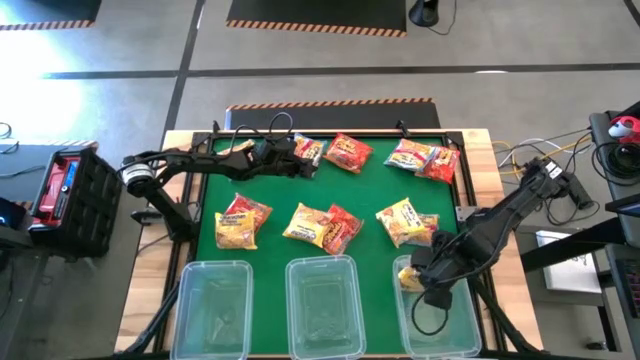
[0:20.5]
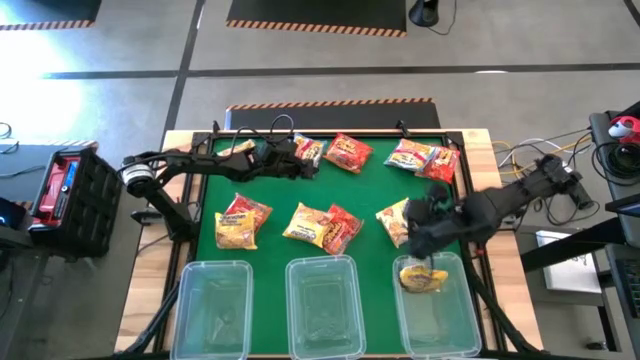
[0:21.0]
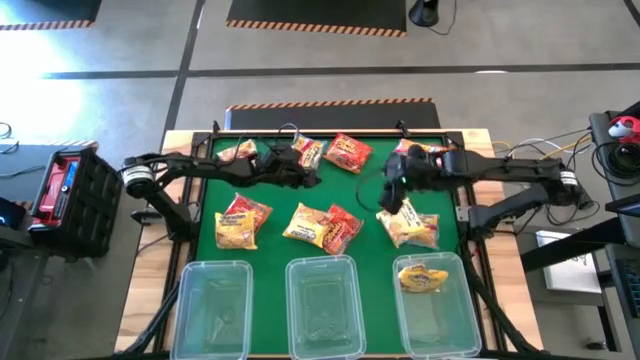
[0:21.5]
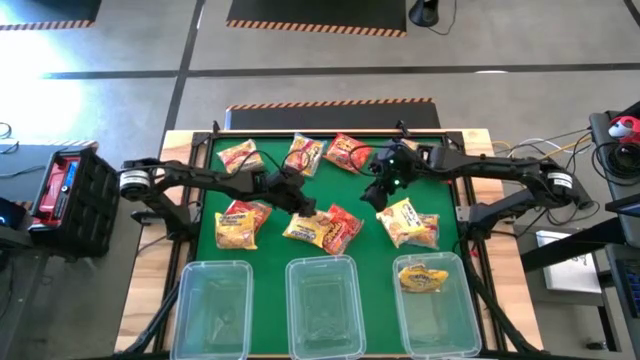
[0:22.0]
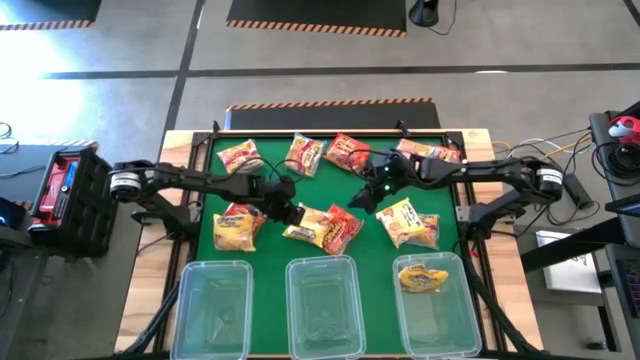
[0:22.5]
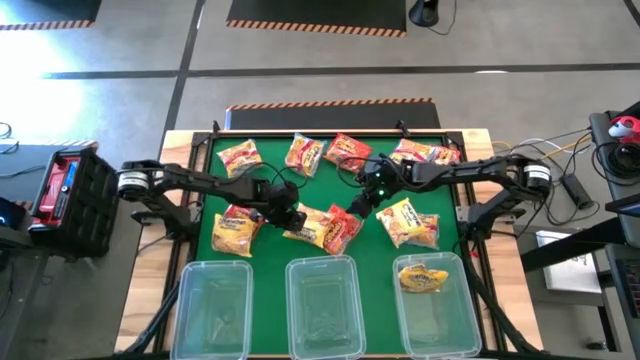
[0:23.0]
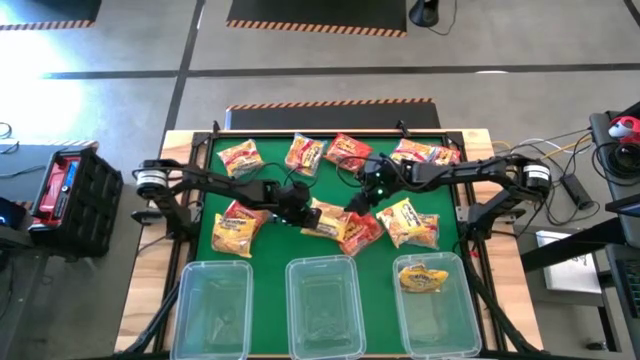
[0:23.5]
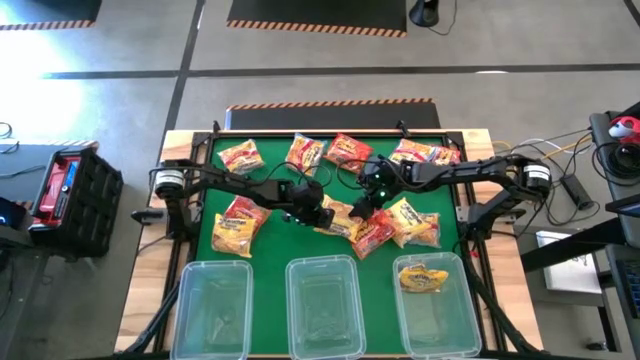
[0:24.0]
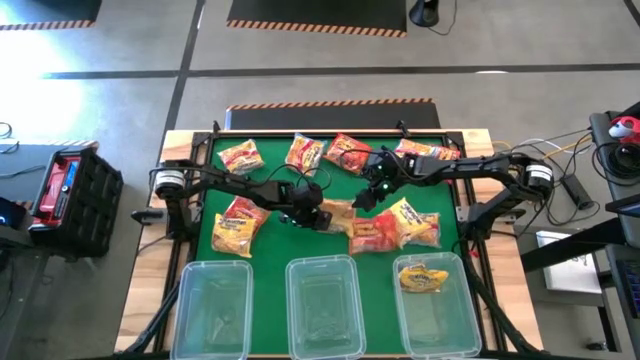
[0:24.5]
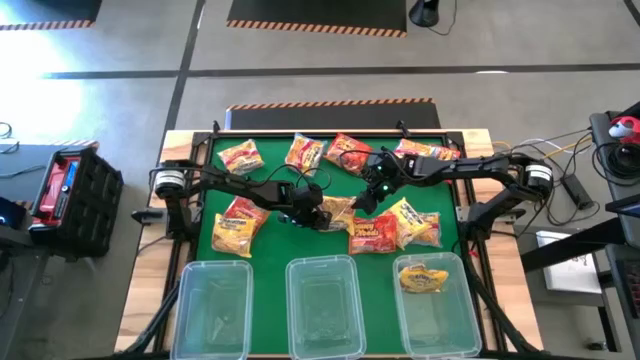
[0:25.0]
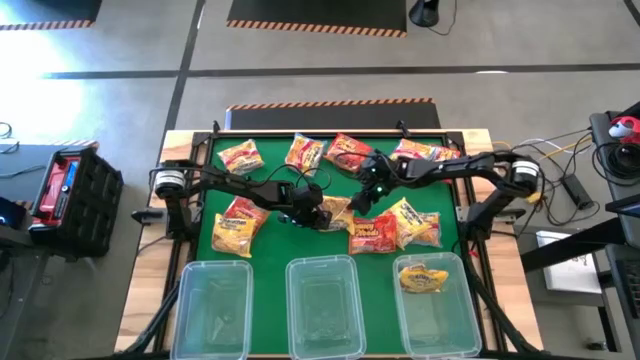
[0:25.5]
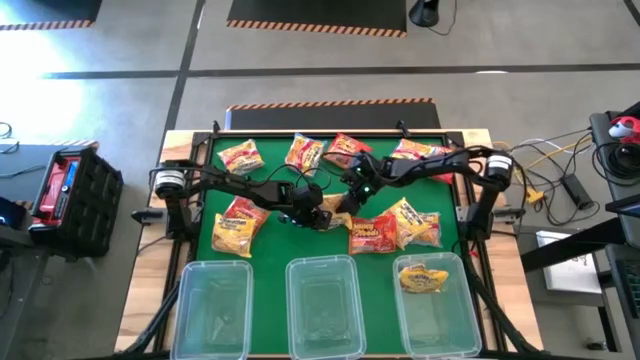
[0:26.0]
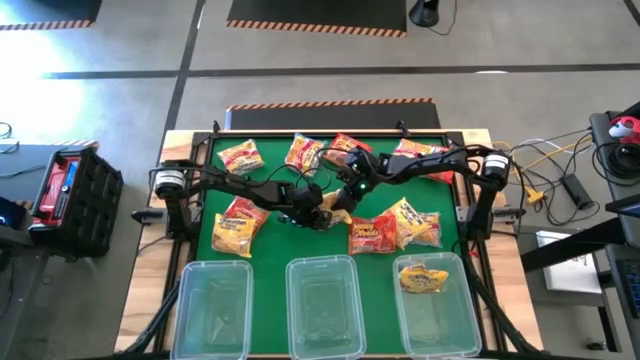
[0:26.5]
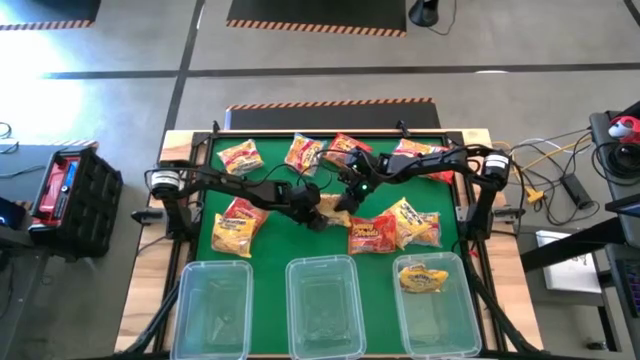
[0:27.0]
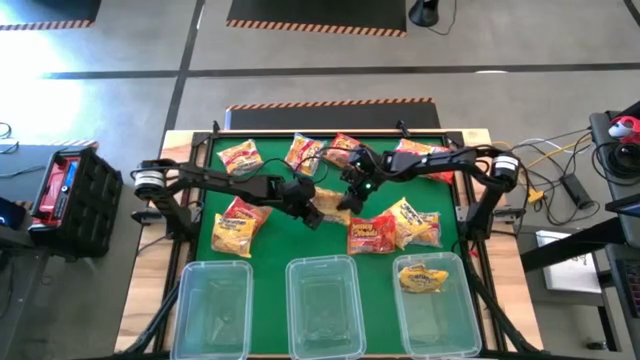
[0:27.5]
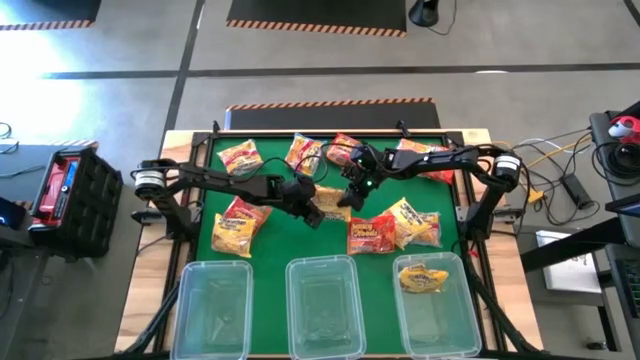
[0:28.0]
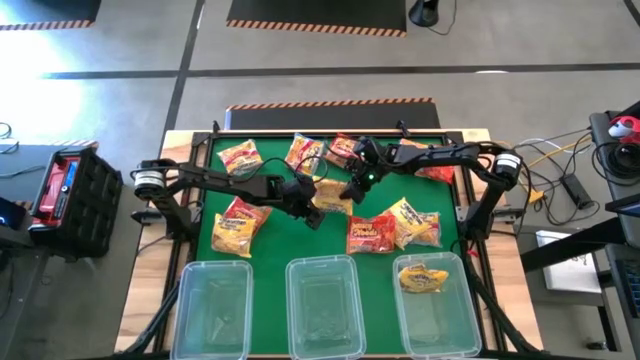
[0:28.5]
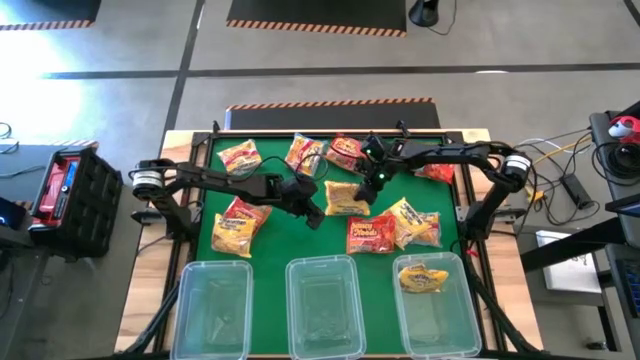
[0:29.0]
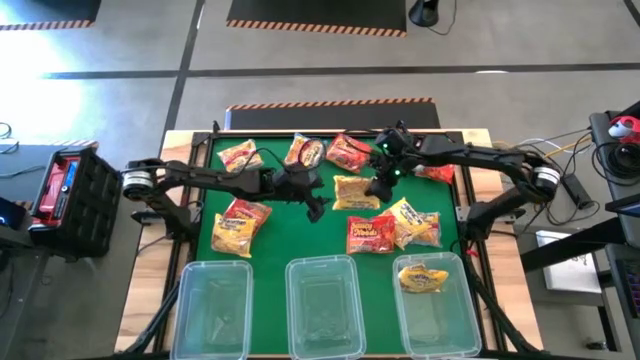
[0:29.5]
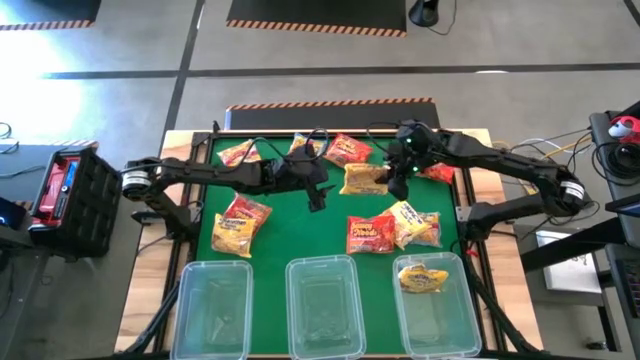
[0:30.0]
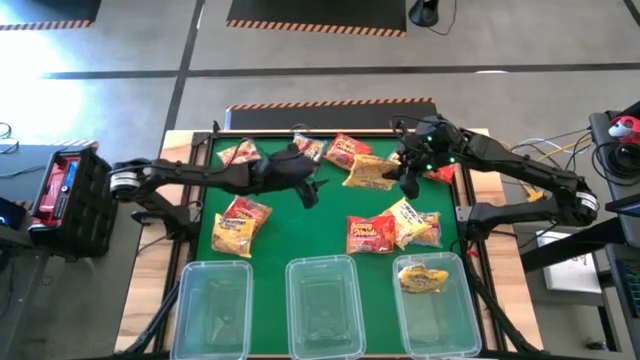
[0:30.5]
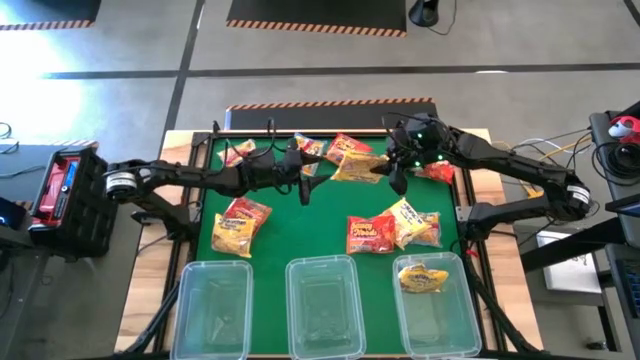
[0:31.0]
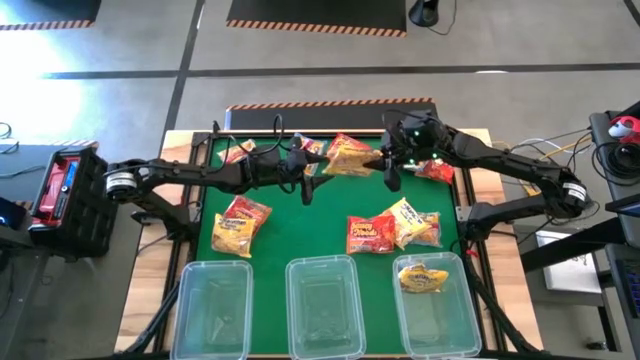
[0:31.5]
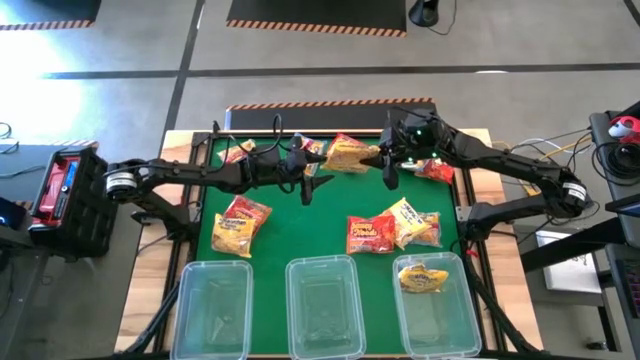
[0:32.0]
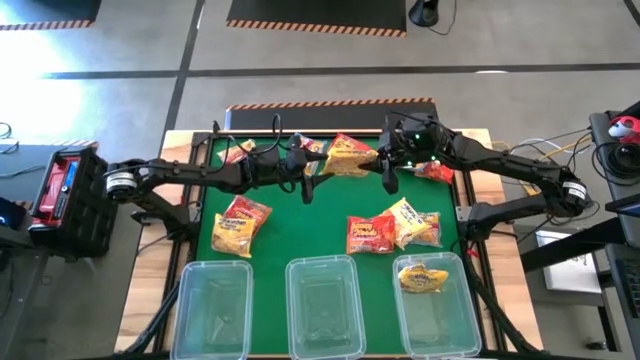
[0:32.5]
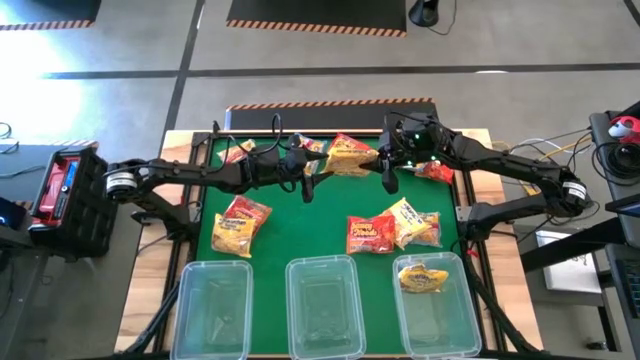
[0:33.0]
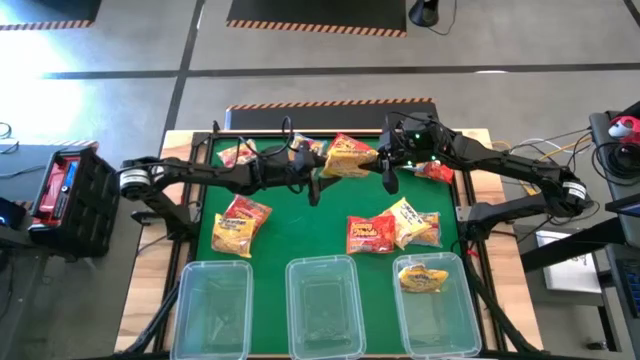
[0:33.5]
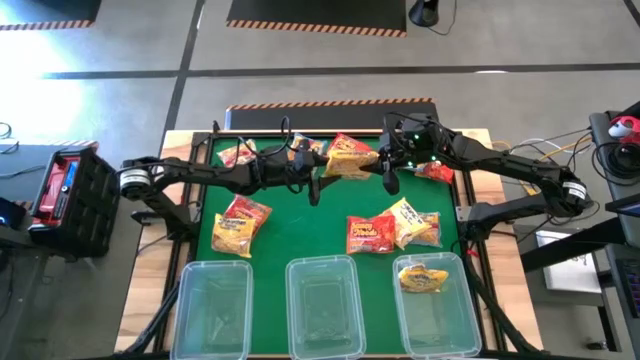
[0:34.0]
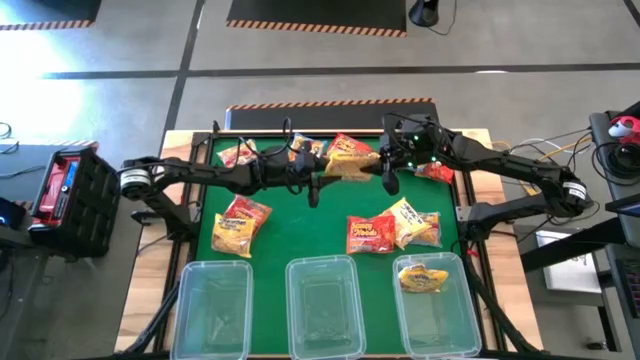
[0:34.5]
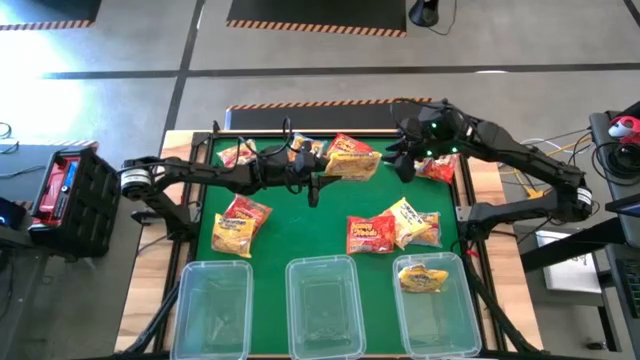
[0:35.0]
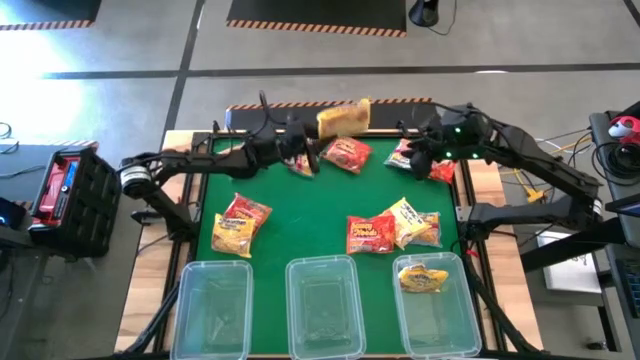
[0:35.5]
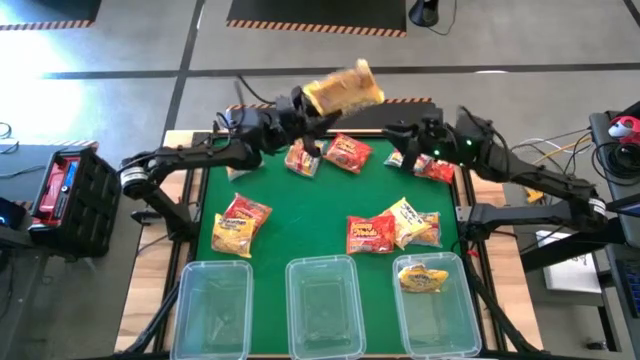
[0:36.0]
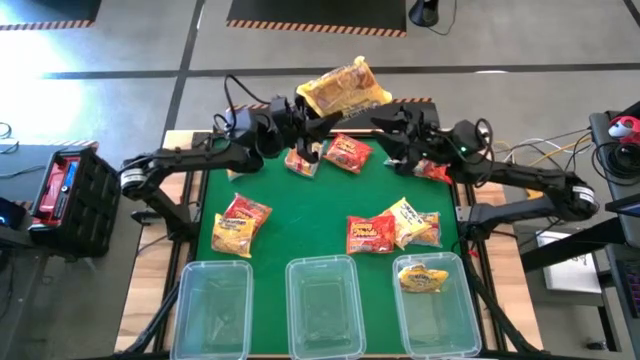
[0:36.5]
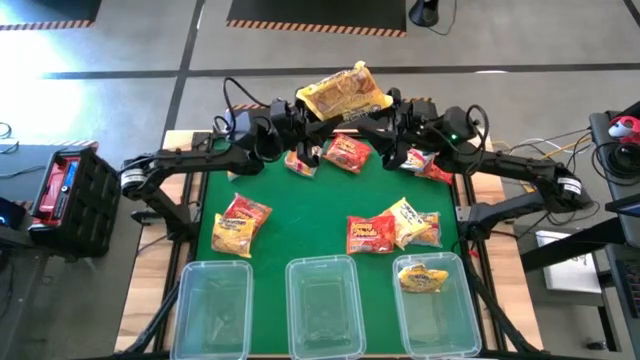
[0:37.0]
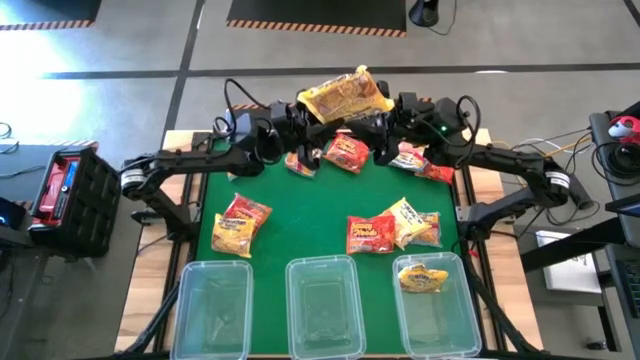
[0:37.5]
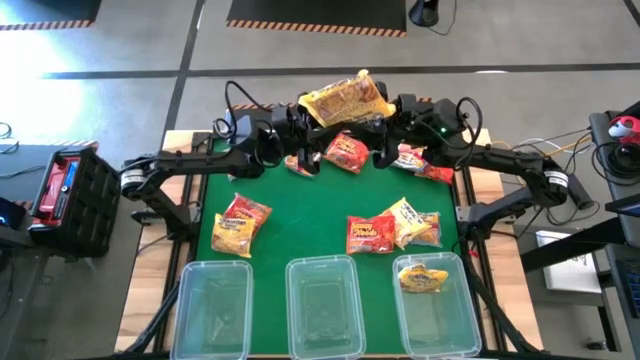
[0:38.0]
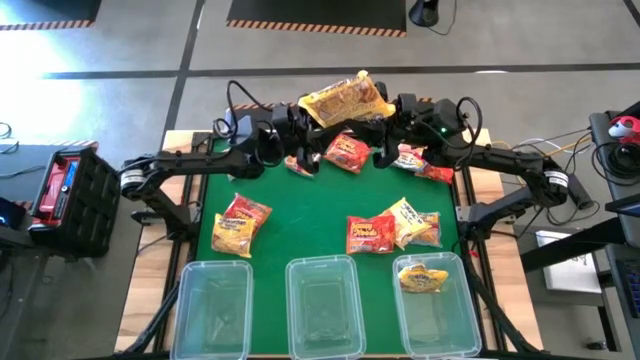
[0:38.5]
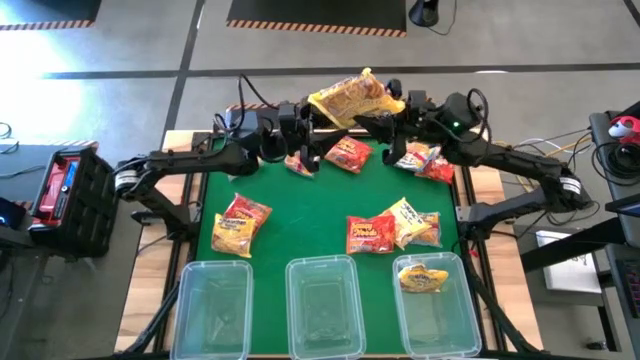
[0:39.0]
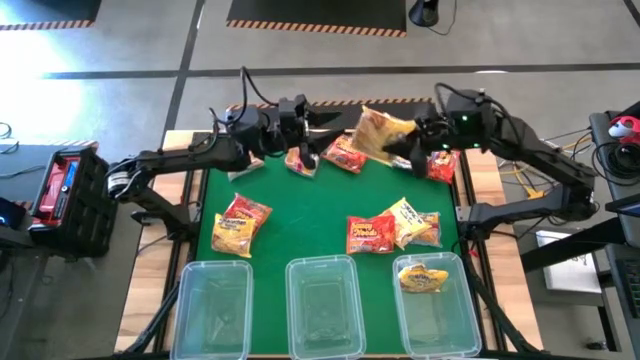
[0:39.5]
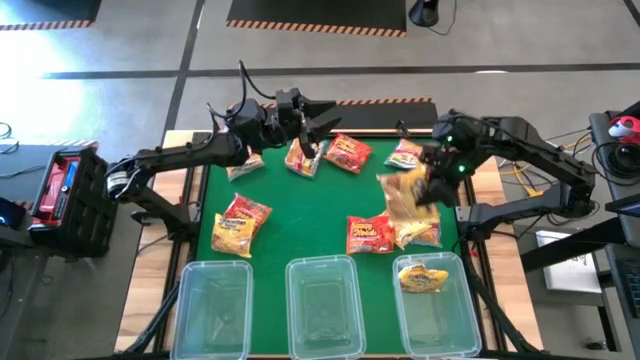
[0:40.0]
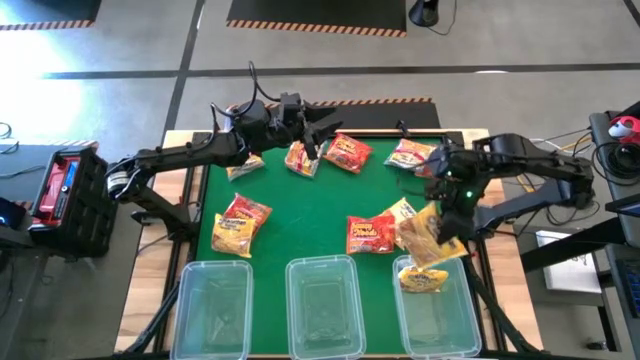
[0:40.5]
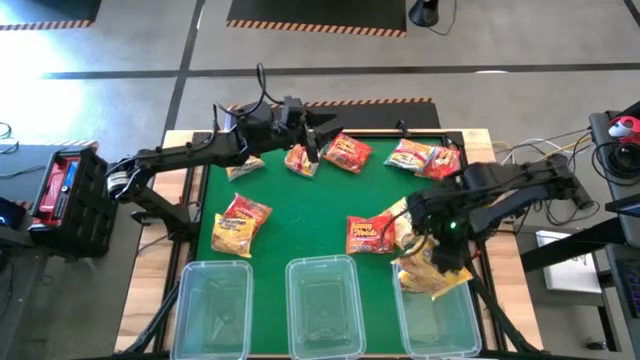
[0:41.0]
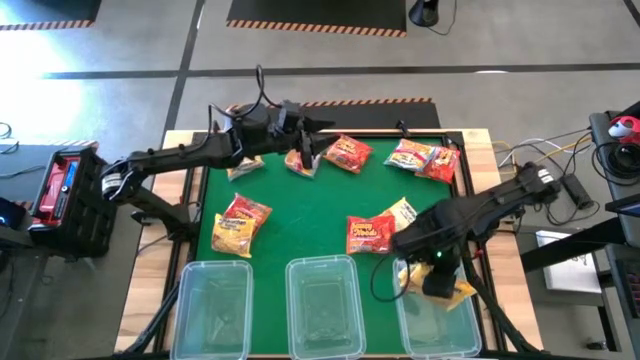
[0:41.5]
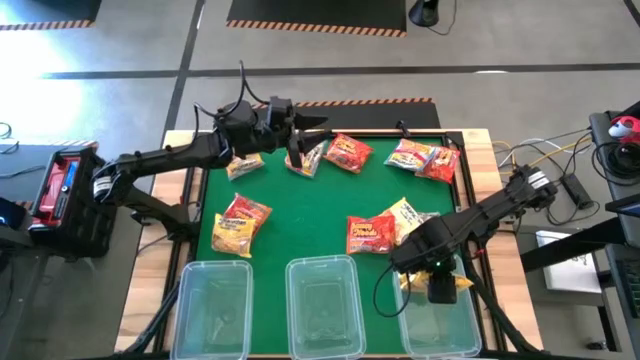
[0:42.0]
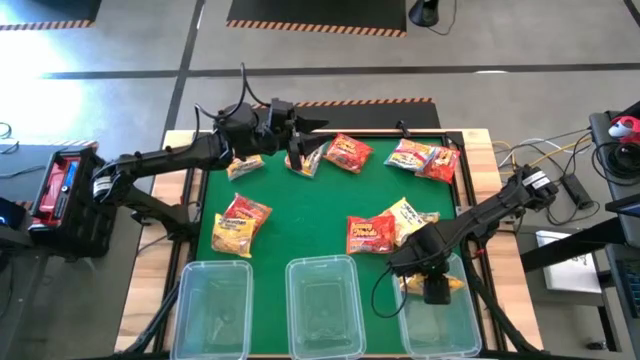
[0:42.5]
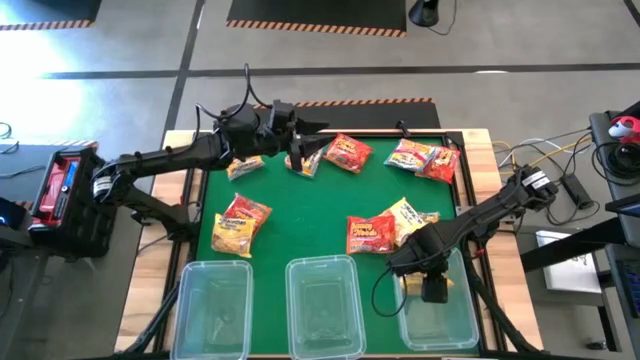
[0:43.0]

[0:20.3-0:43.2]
Task: Sort Maruchan noodles
Put the yellow noodle pack into the right transparent bin
